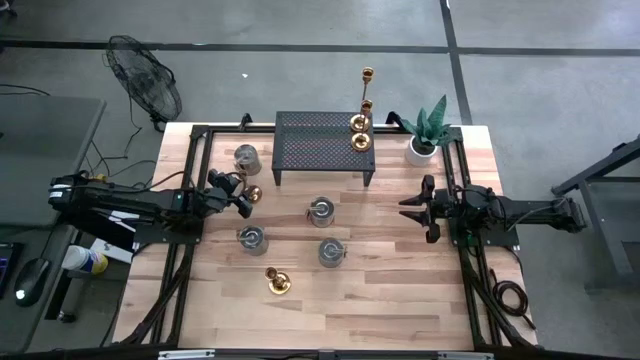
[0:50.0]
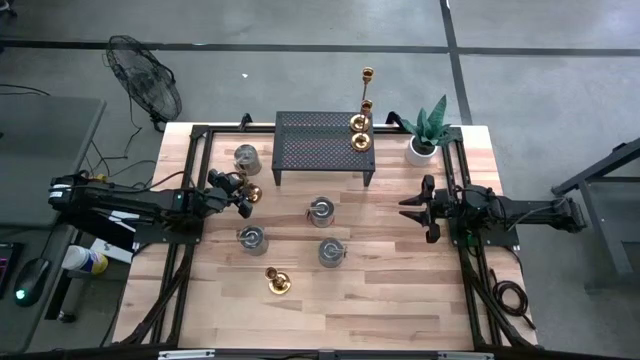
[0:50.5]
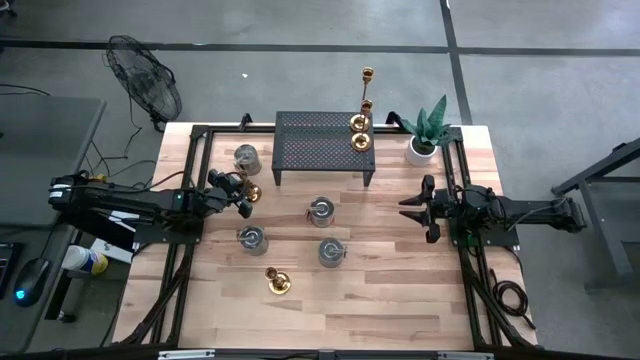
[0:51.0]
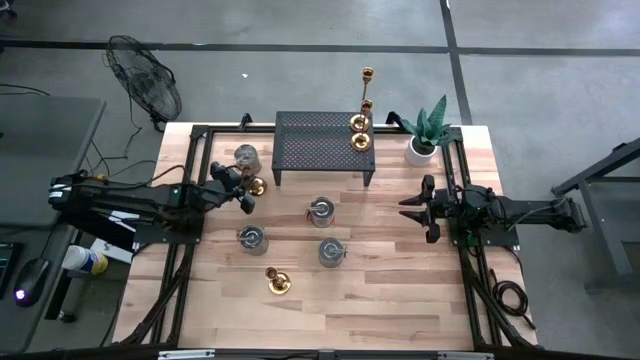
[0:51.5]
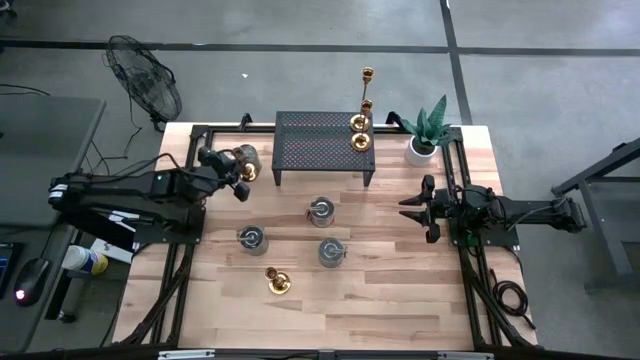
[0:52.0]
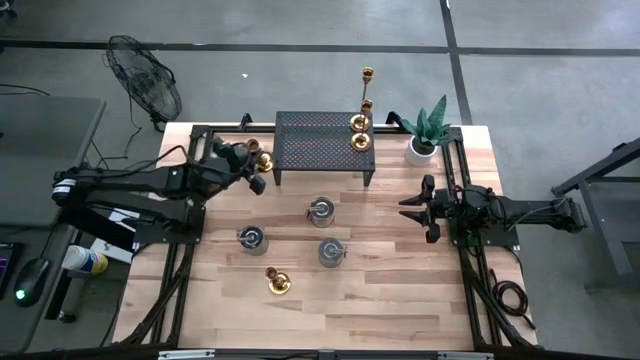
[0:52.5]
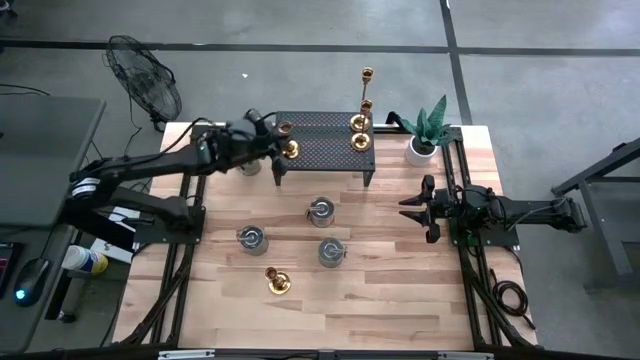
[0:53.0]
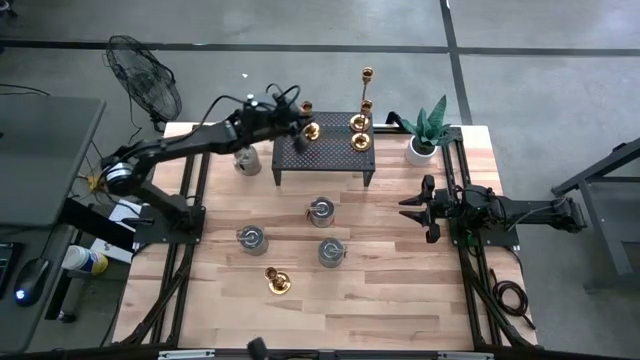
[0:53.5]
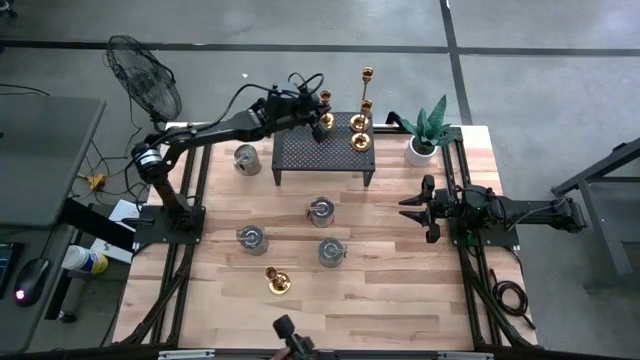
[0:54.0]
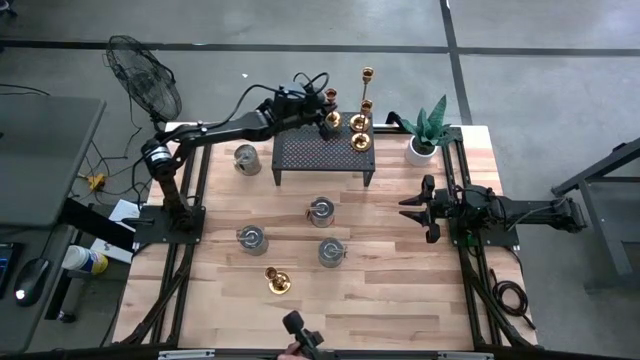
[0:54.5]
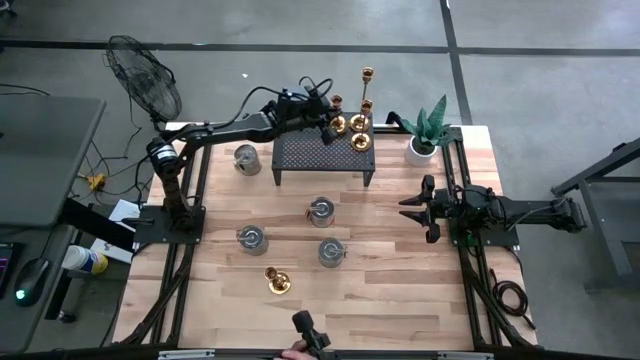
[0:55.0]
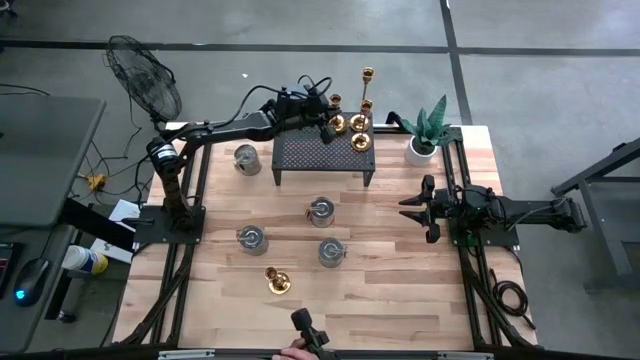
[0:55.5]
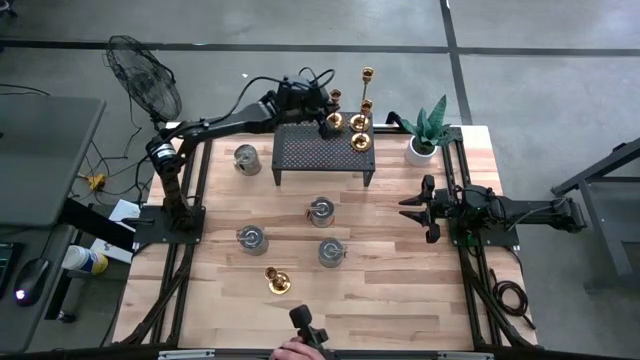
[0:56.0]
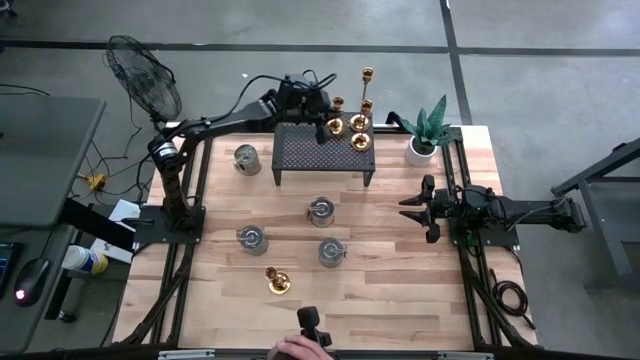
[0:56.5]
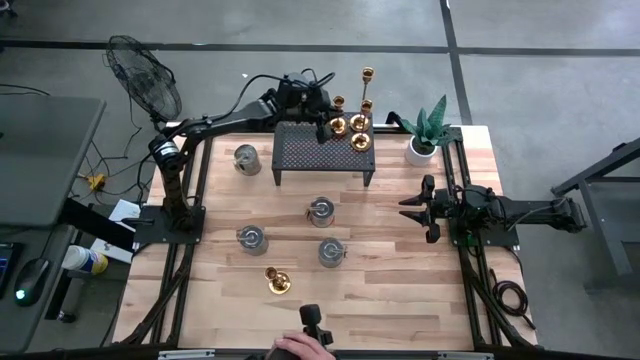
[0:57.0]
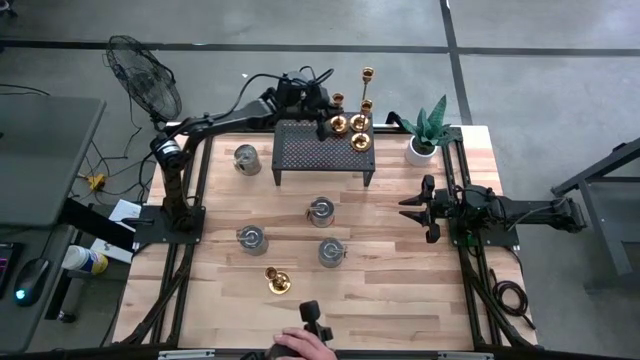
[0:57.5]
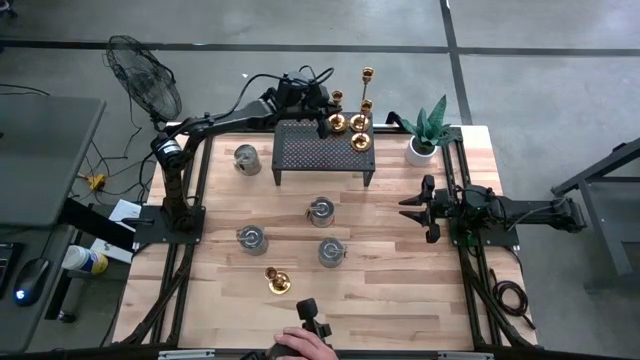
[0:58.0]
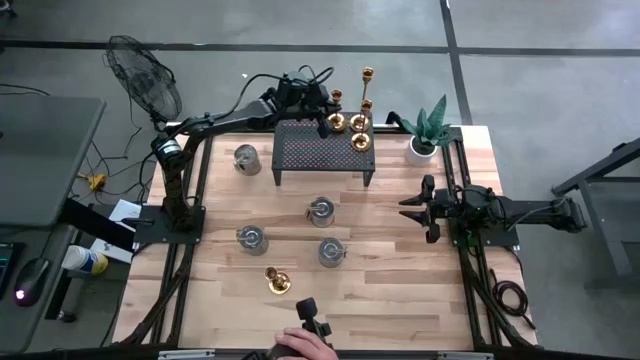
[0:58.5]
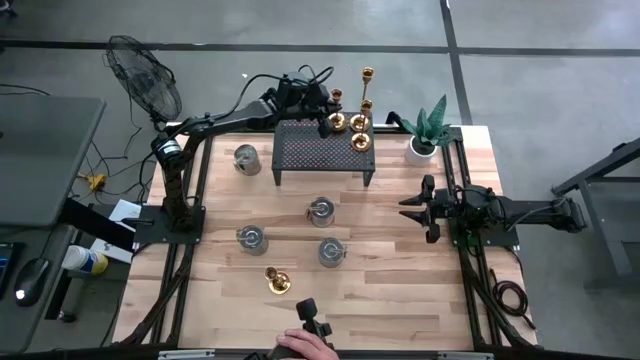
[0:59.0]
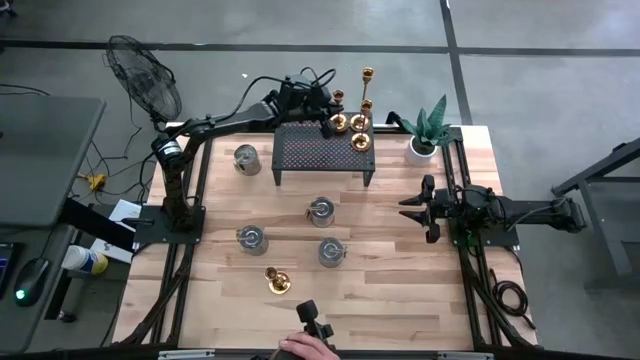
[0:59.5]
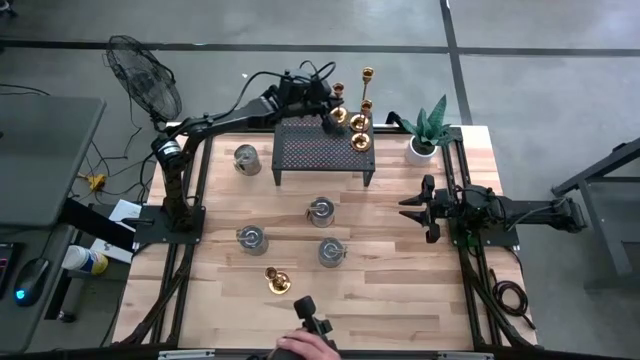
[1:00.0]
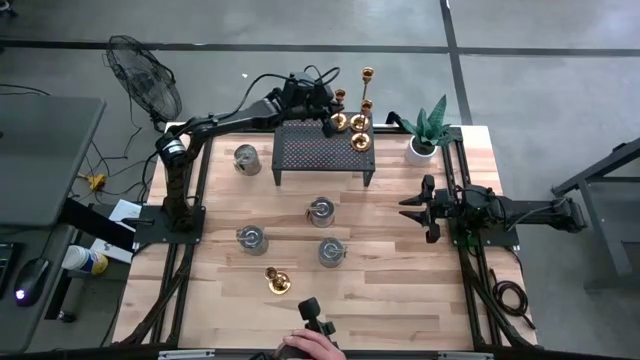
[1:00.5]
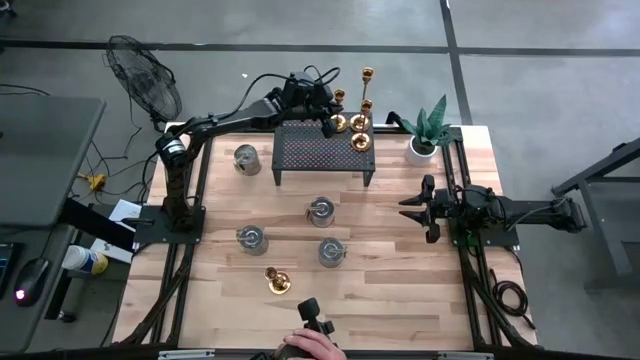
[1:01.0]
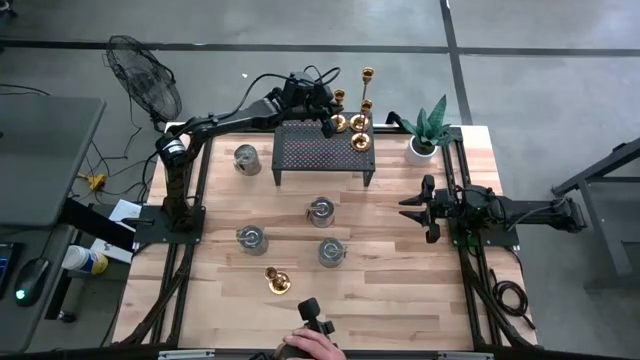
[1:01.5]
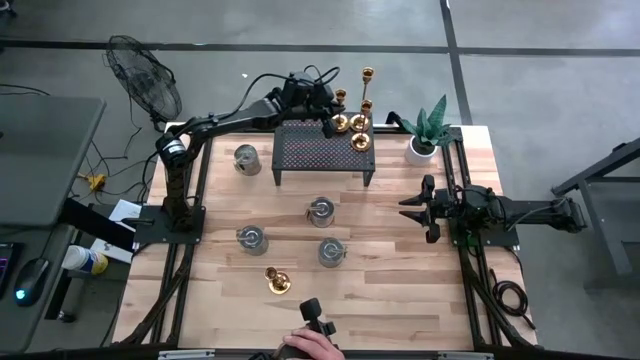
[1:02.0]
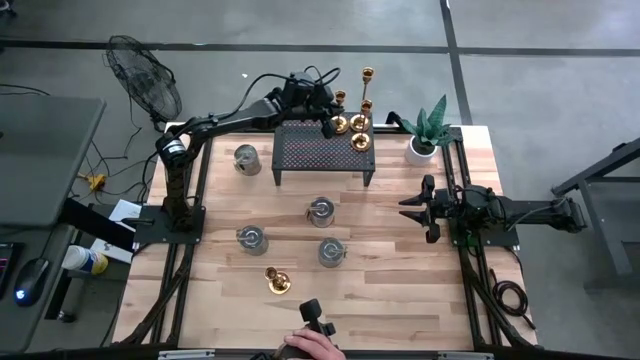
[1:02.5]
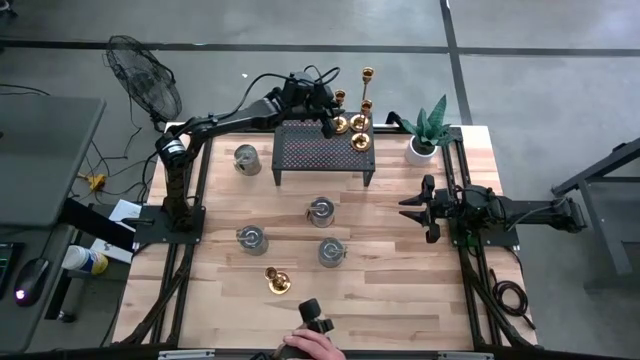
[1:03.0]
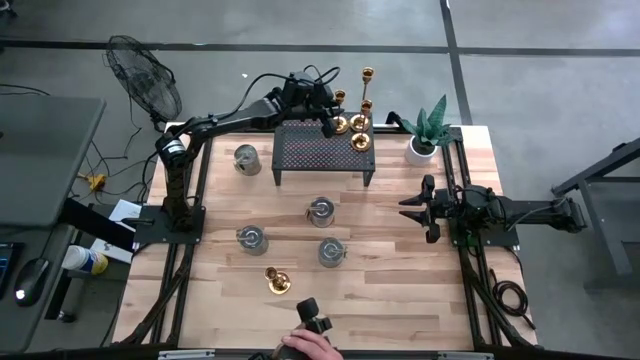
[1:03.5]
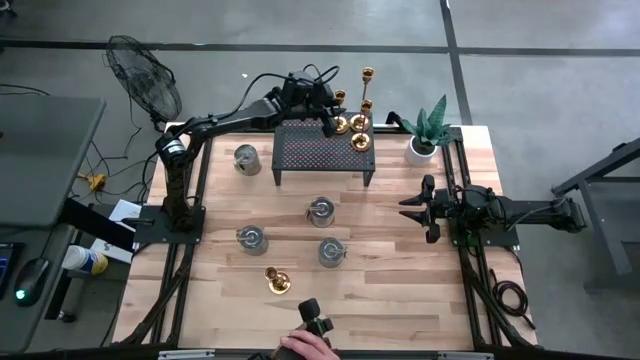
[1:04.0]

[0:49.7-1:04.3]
Task: Pick & Place candle stick holders
Put the gold candle holder on the shelf

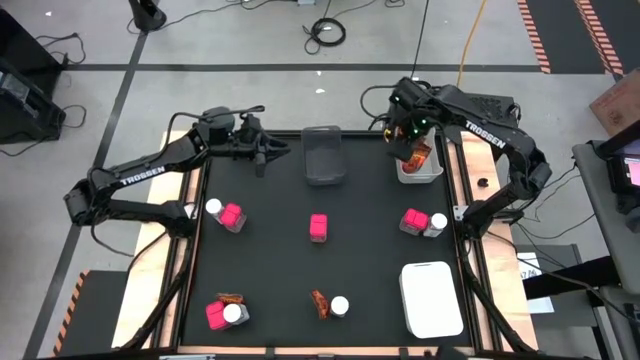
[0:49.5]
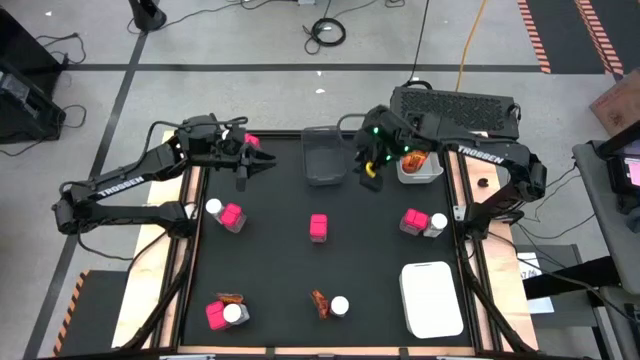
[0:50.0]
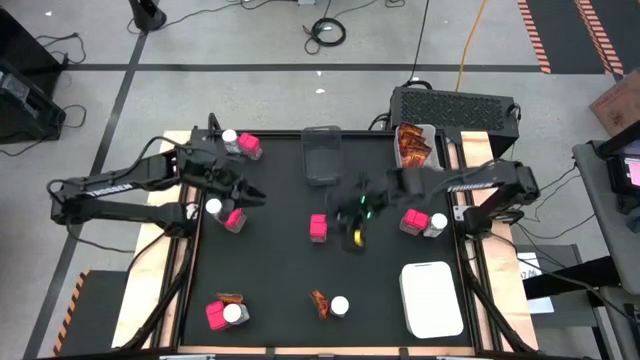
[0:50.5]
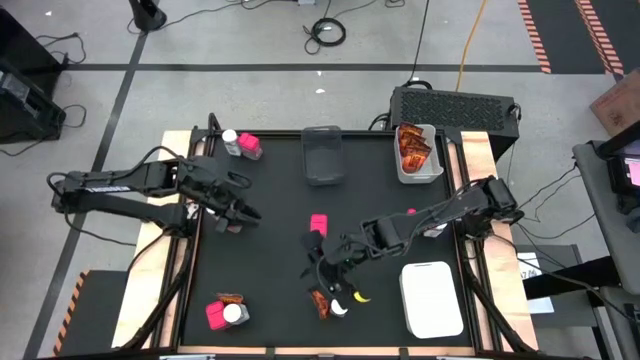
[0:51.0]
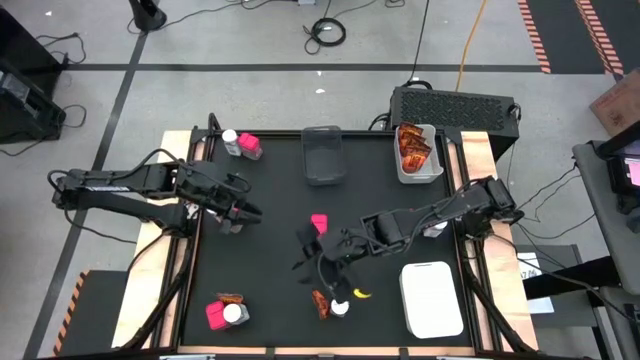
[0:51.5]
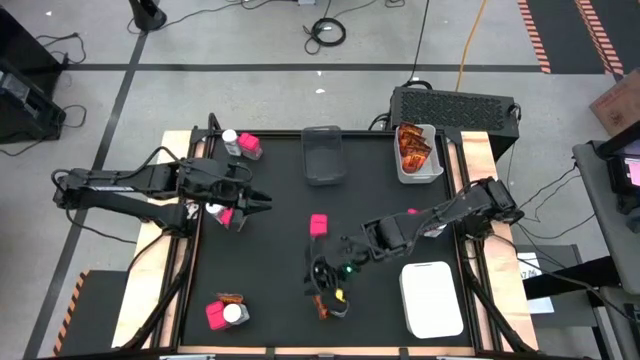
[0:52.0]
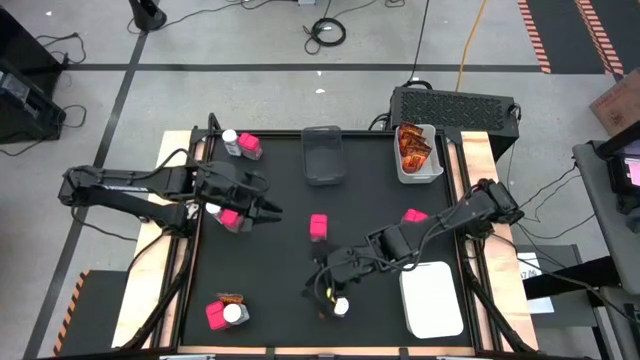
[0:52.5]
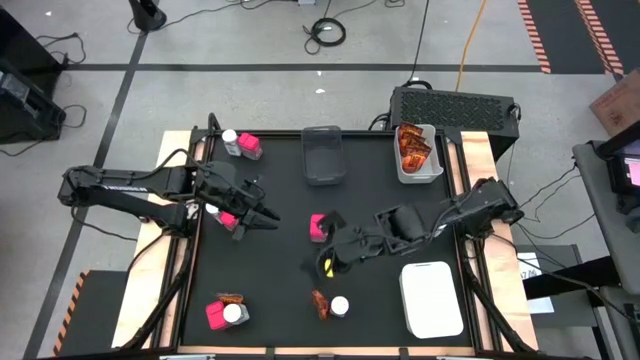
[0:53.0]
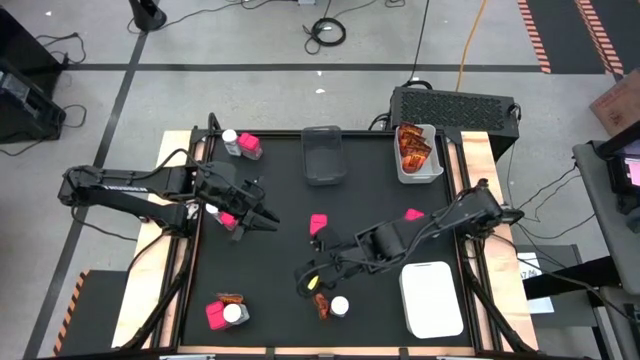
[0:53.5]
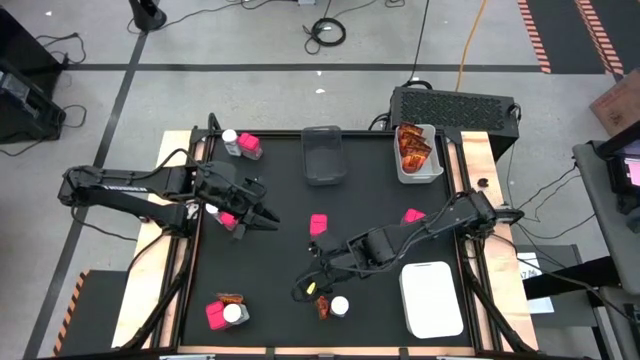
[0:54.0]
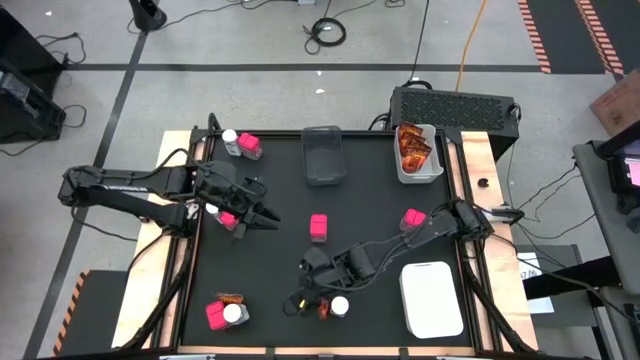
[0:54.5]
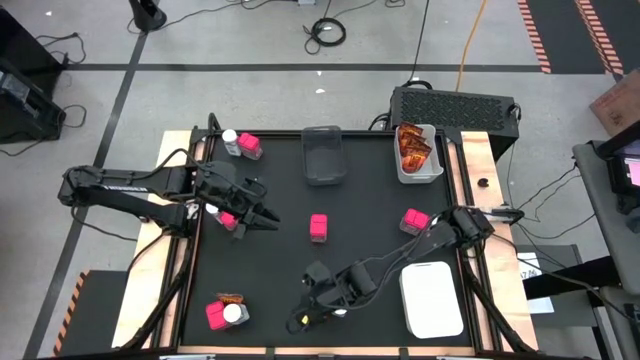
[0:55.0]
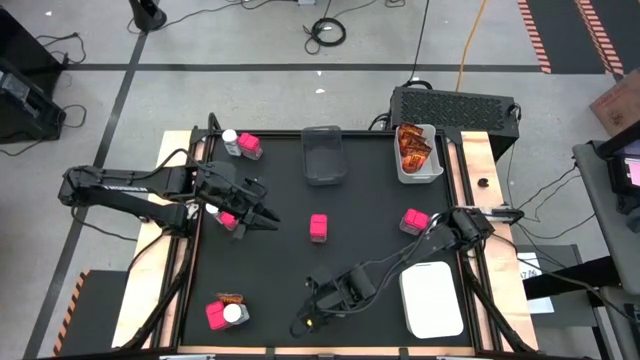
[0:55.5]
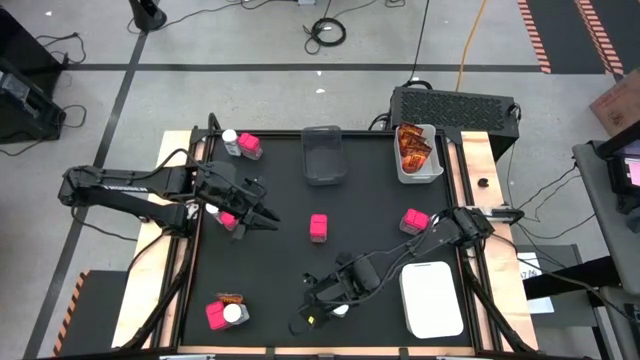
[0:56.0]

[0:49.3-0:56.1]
Task: Sort spices by type
Put the orange seasoning pack into the top white bin

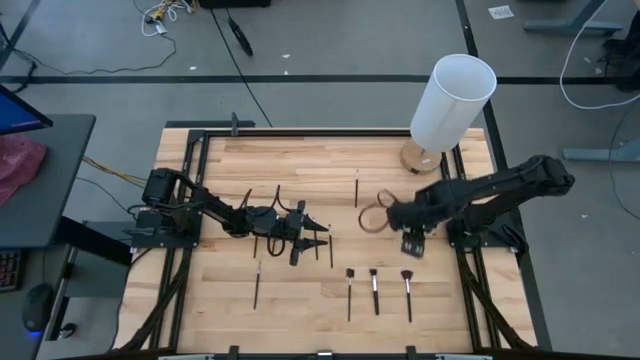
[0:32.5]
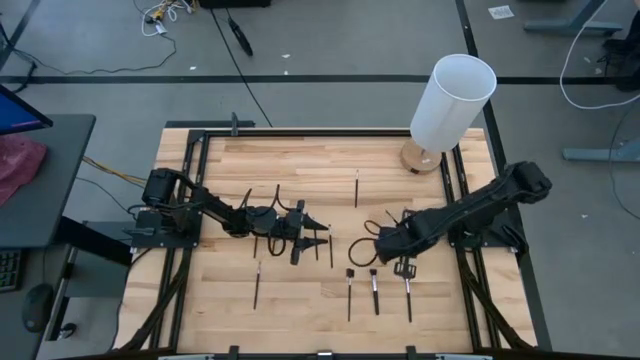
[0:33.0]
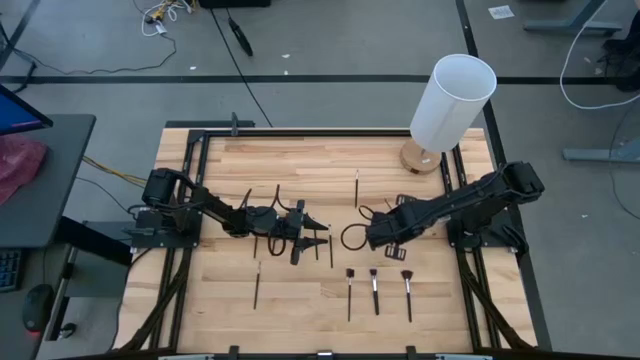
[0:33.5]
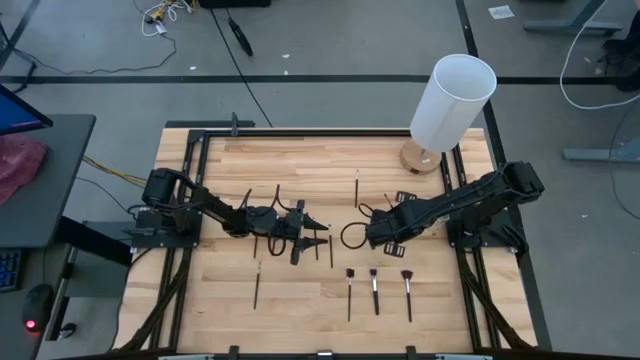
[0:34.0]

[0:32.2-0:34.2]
Task: Put items in baskets/containers
Adjust the transparent organizer
